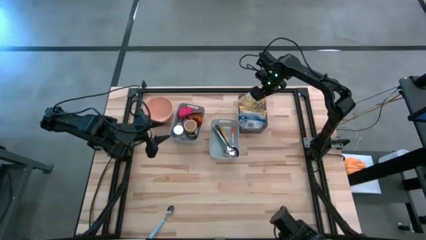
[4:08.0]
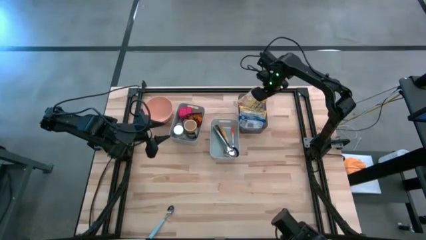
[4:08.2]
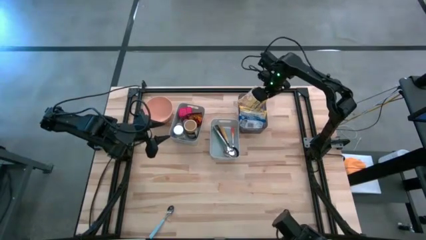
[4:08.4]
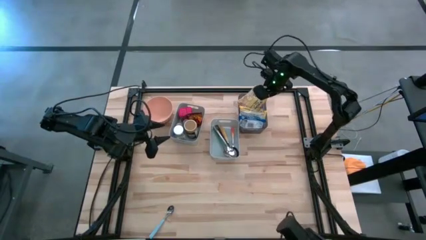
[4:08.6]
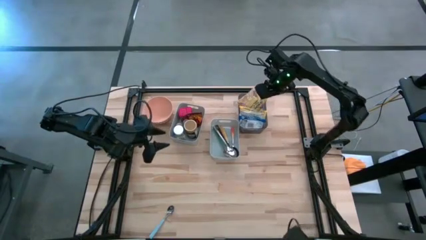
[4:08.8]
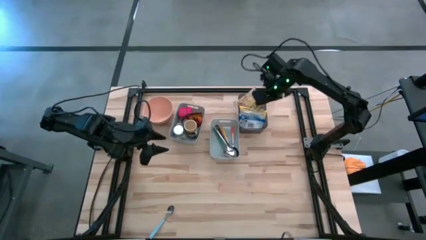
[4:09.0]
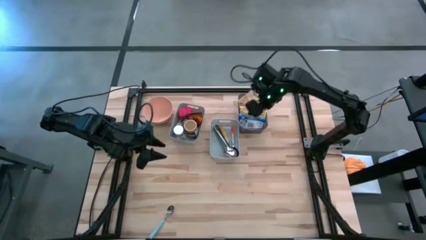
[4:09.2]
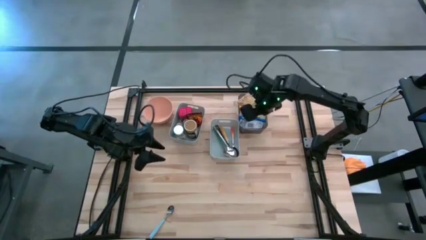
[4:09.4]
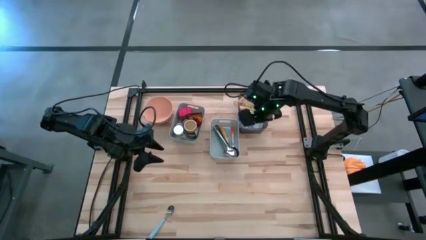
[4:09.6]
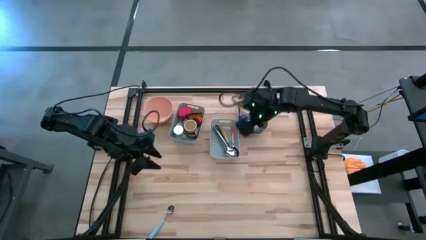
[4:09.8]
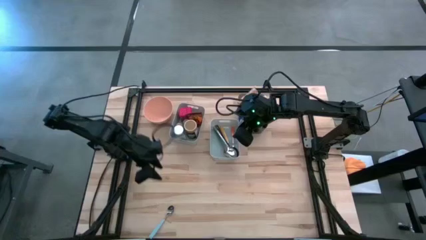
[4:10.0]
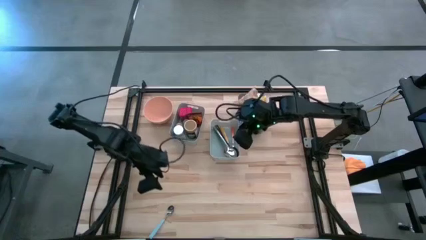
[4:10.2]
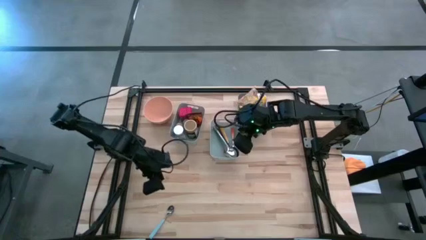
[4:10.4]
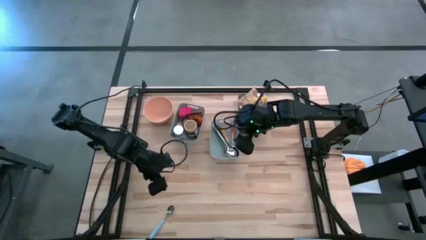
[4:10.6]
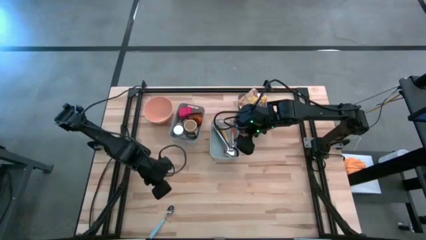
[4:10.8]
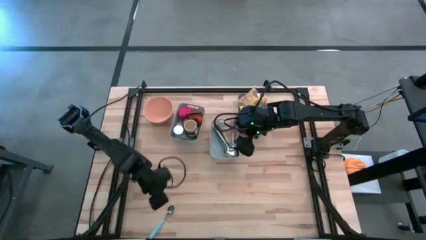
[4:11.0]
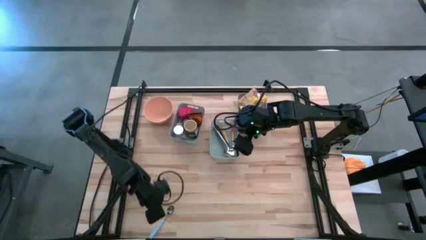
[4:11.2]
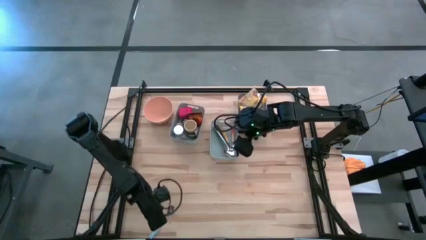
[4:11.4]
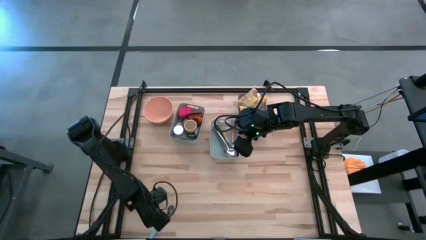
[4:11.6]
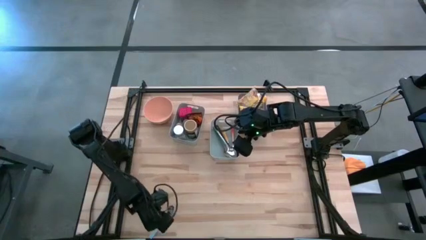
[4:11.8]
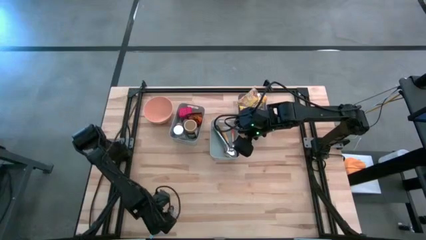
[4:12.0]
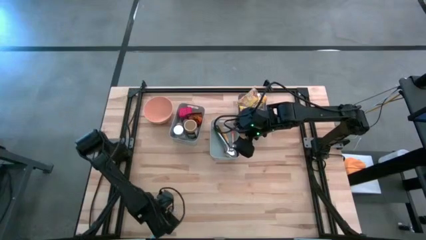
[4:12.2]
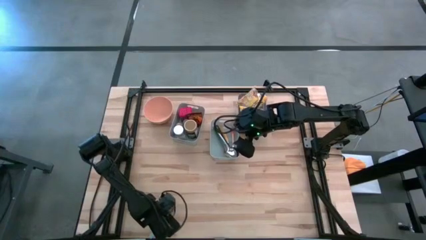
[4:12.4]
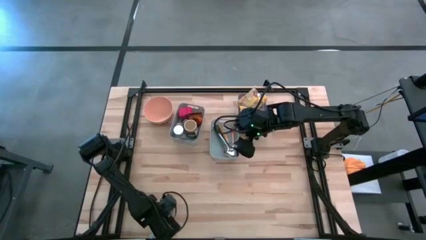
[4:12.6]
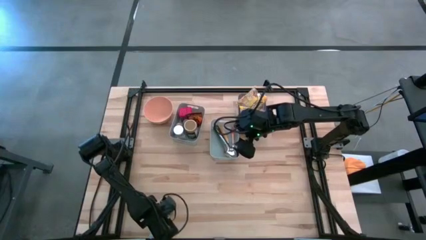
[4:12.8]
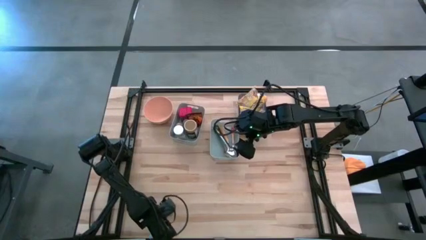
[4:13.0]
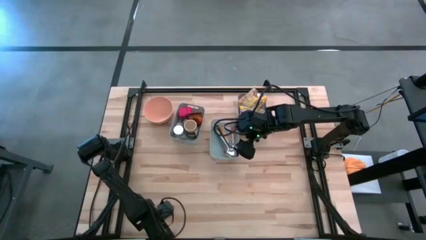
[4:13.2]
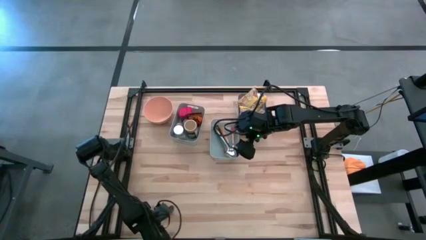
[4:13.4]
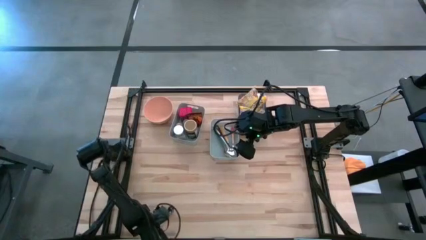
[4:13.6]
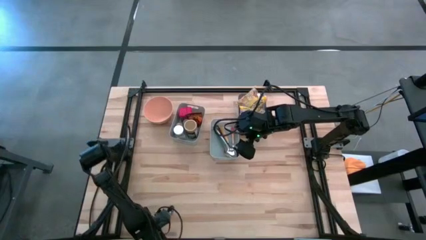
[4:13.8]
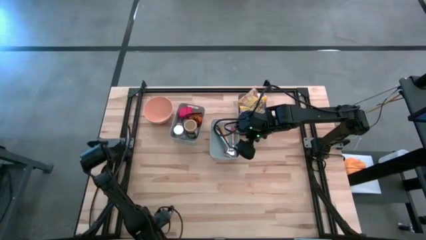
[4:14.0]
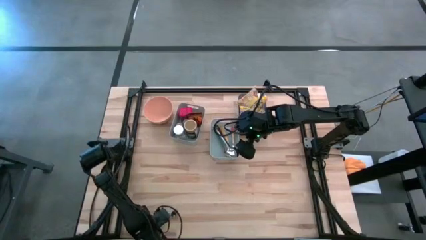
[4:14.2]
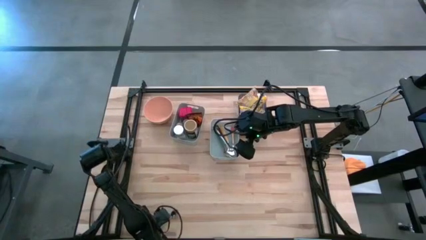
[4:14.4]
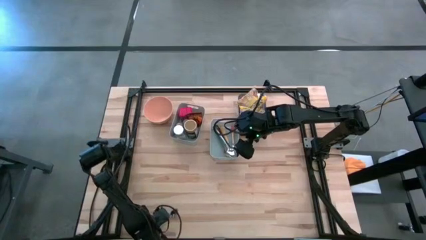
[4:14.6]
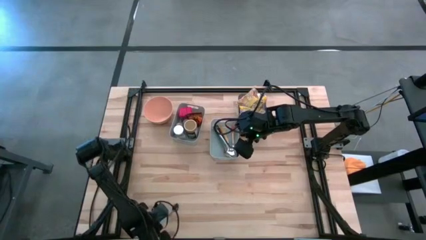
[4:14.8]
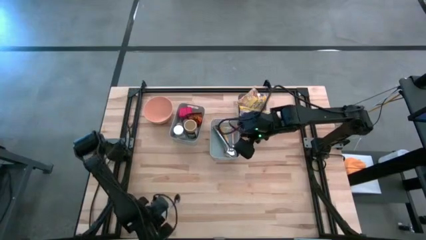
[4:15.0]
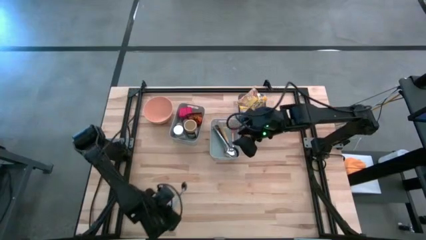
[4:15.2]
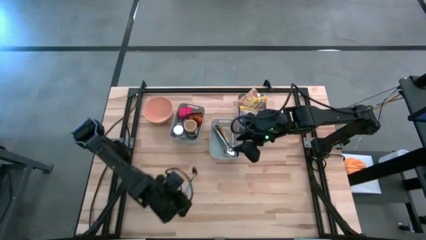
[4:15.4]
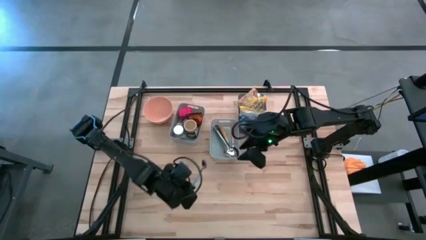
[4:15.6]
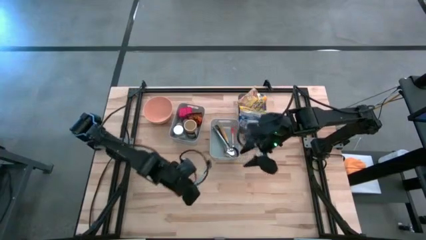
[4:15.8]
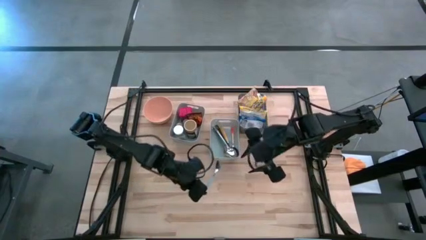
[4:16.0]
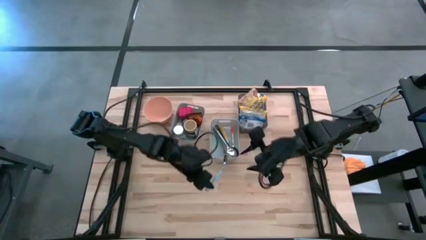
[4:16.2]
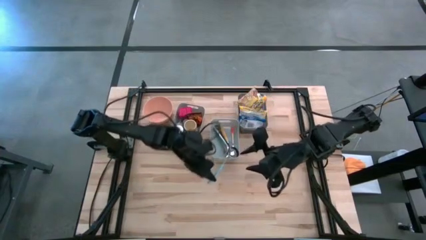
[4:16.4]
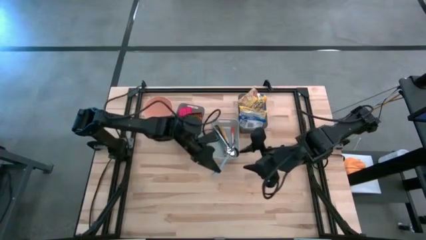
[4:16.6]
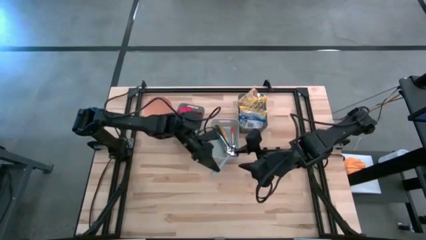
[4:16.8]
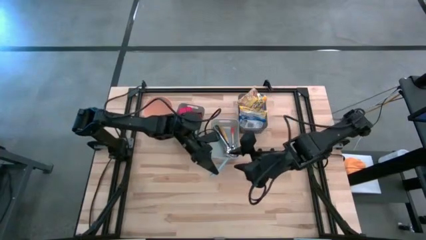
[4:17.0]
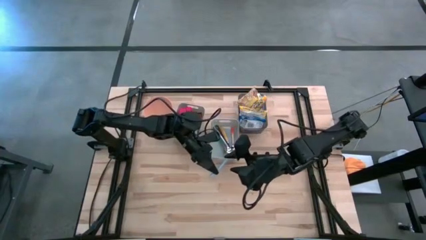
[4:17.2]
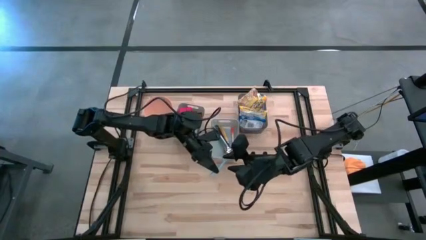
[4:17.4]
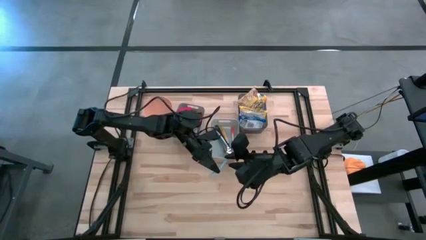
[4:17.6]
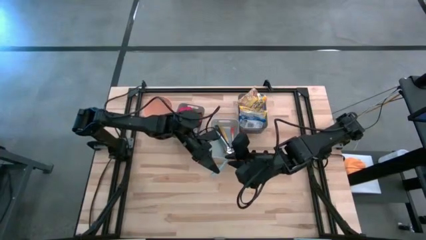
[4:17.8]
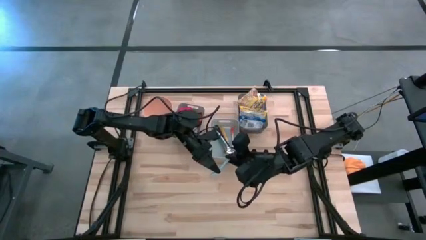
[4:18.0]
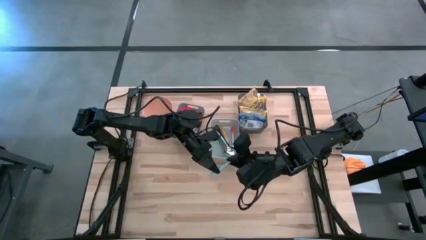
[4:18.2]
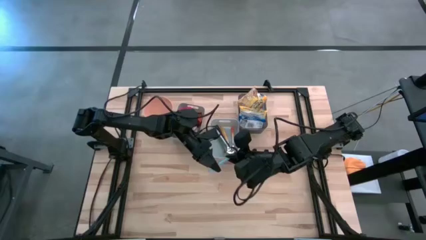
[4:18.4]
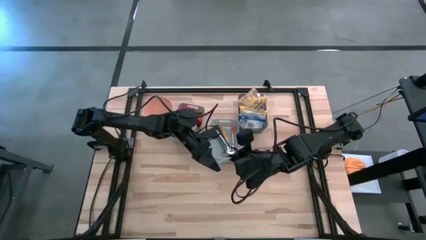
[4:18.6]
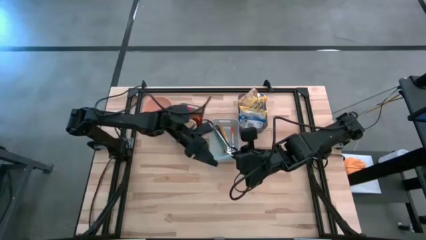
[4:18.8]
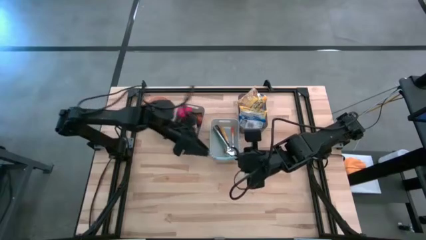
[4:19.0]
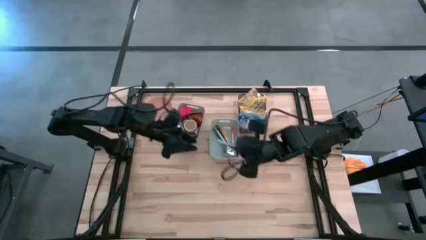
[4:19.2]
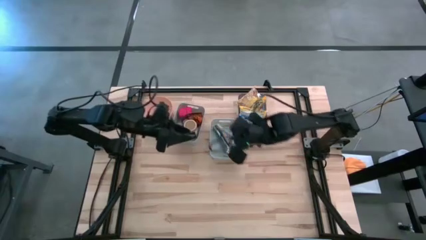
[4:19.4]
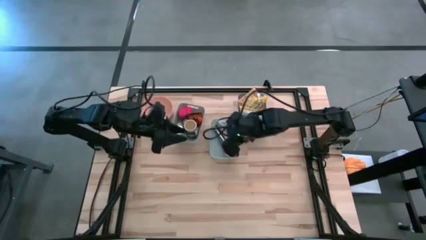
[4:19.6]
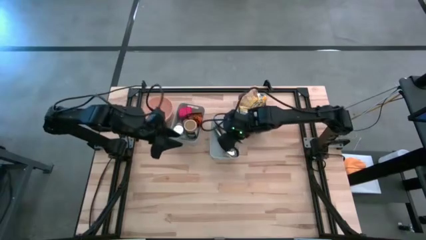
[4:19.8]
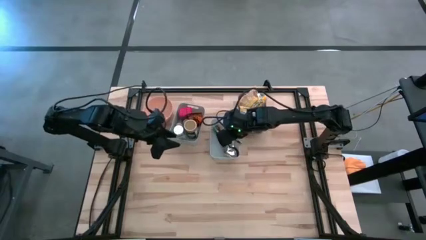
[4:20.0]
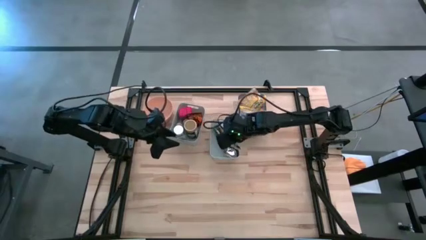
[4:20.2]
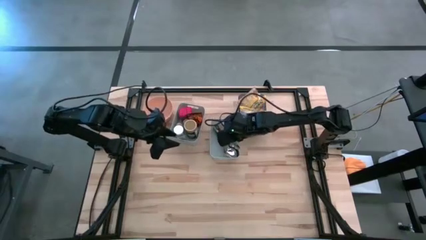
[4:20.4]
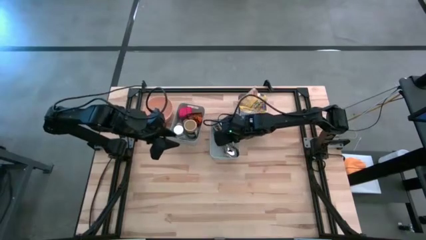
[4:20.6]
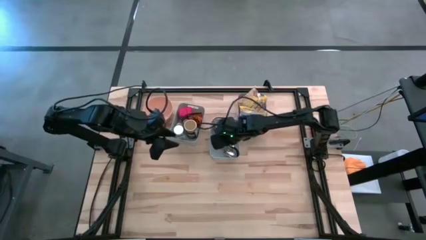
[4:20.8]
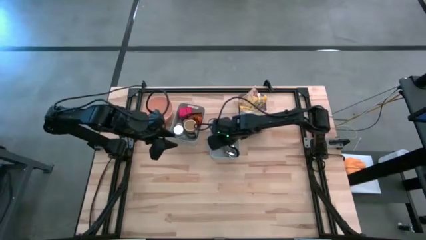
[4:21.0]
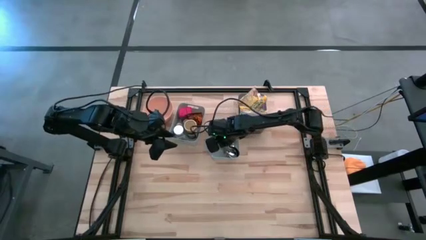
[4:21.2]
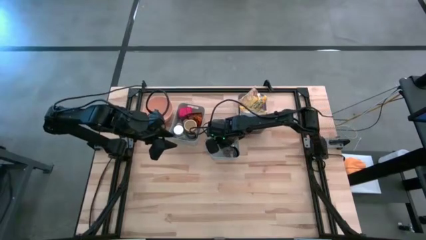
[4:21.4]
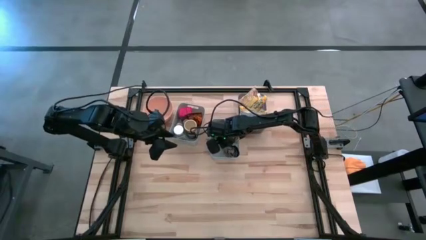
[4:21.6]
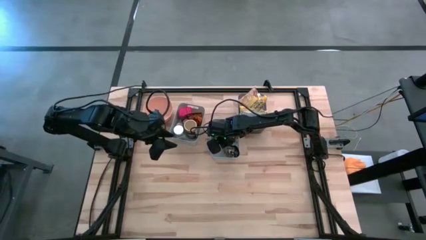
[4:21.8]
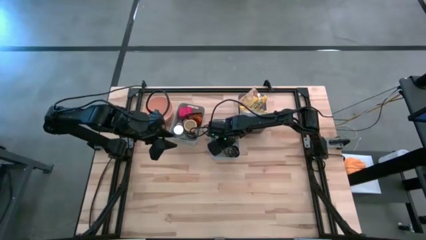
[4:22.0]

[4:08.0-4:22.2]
Put the blue spoon into the right gray bin
